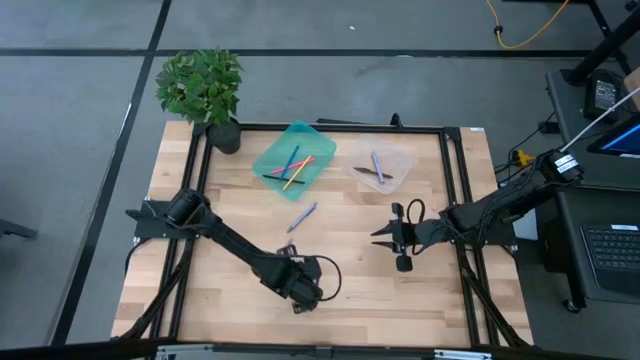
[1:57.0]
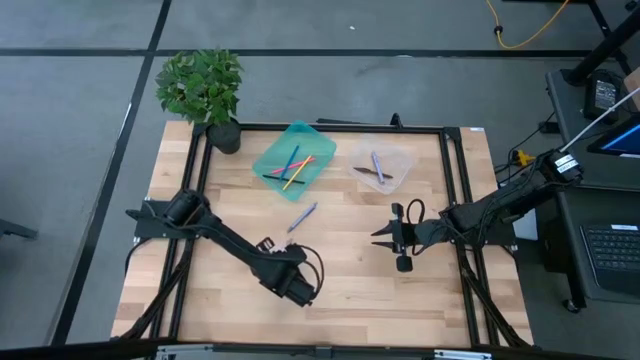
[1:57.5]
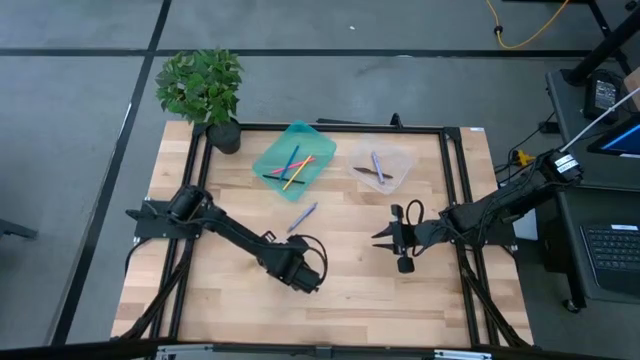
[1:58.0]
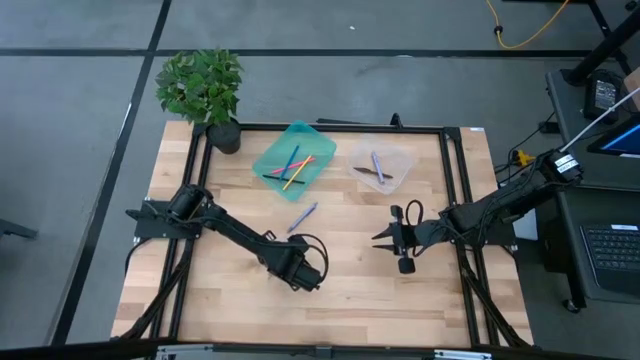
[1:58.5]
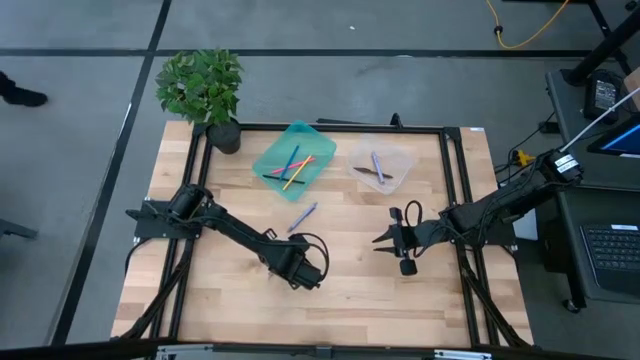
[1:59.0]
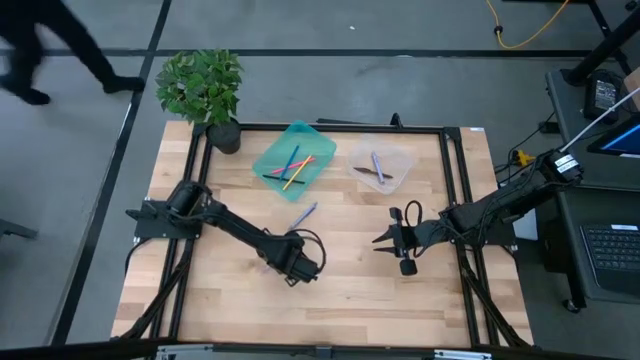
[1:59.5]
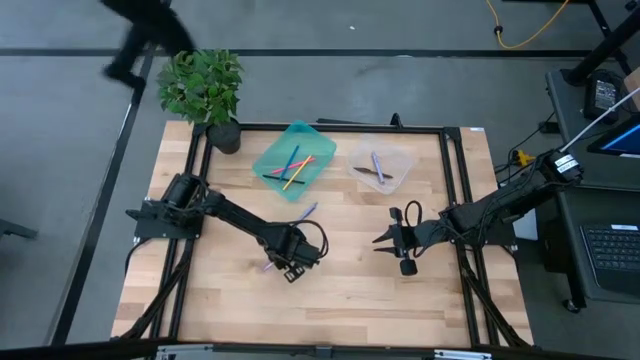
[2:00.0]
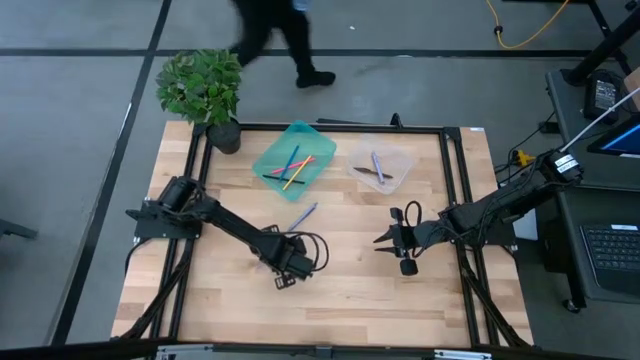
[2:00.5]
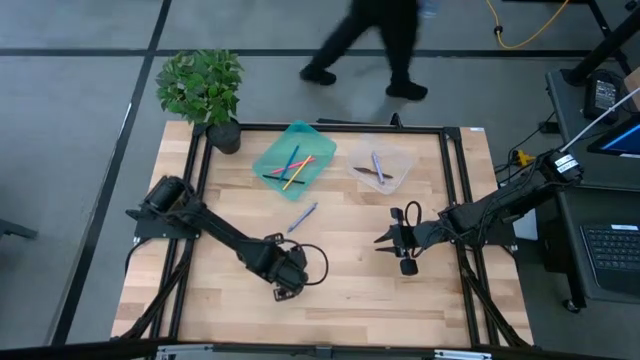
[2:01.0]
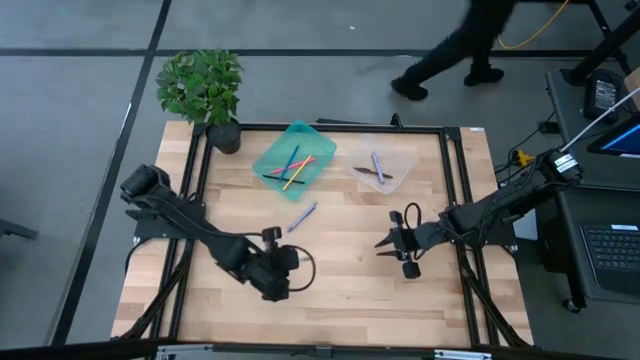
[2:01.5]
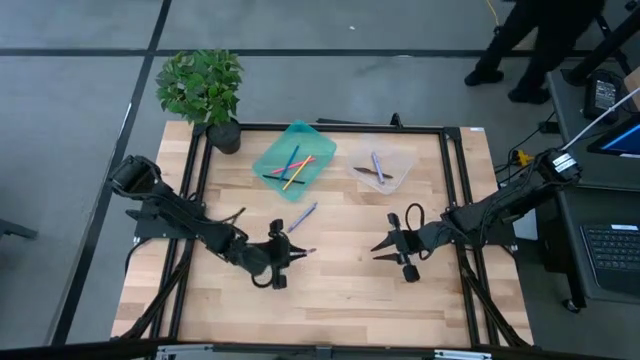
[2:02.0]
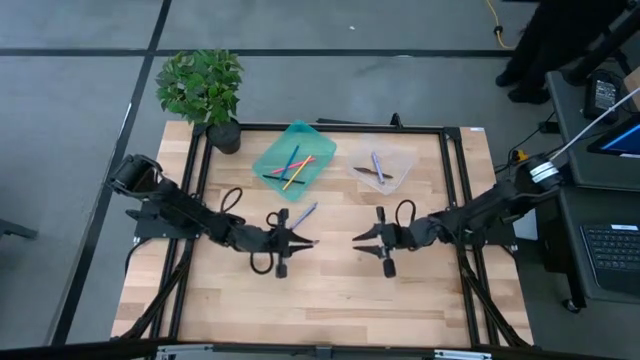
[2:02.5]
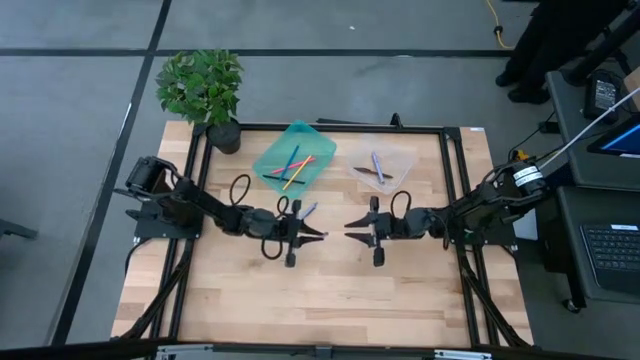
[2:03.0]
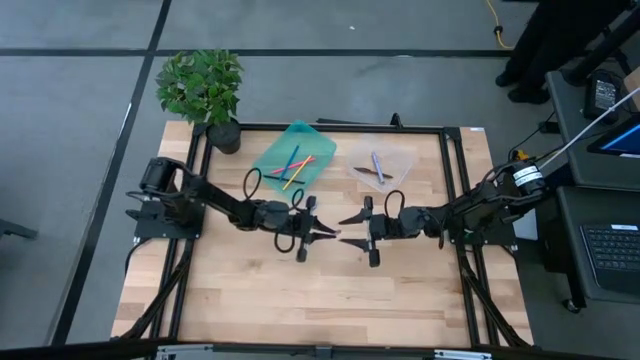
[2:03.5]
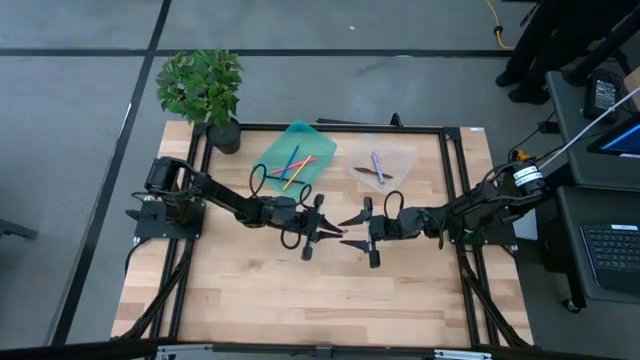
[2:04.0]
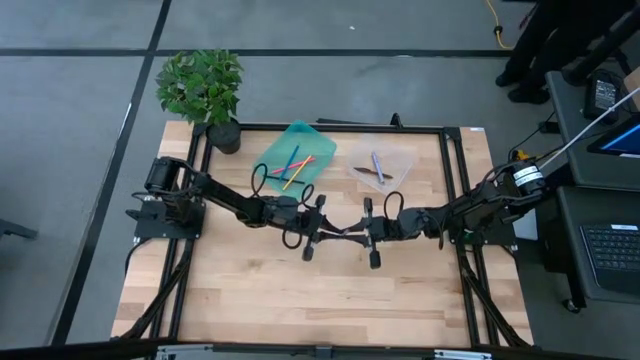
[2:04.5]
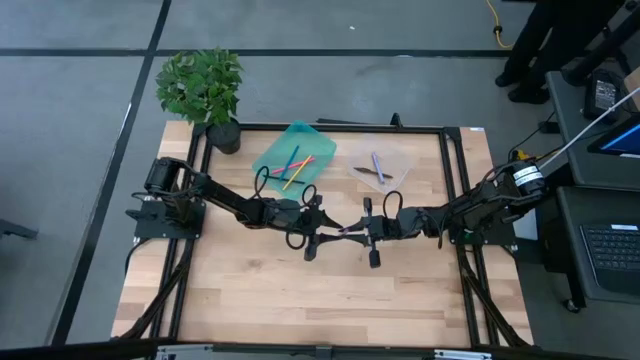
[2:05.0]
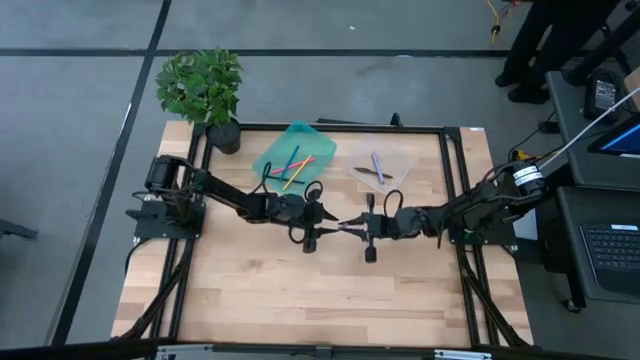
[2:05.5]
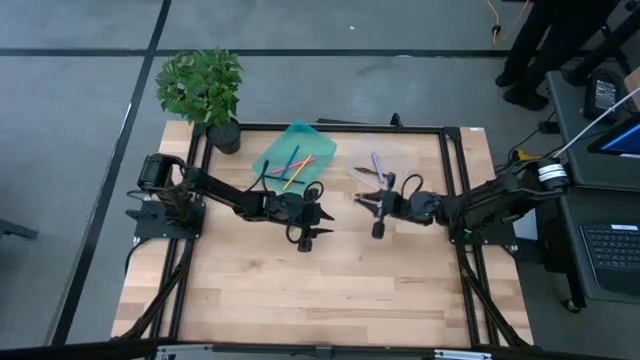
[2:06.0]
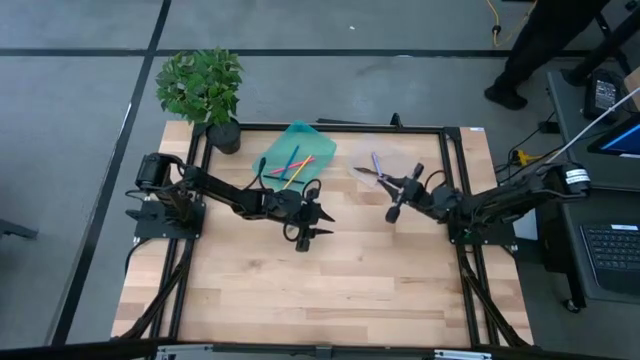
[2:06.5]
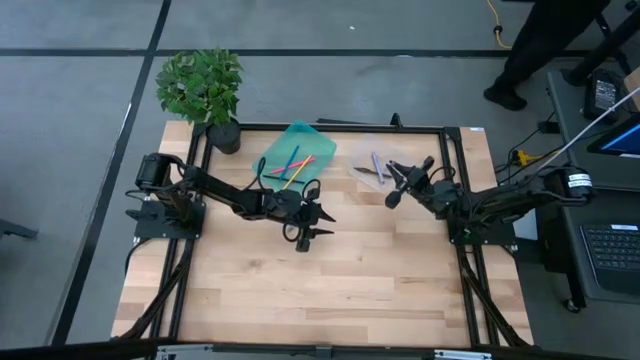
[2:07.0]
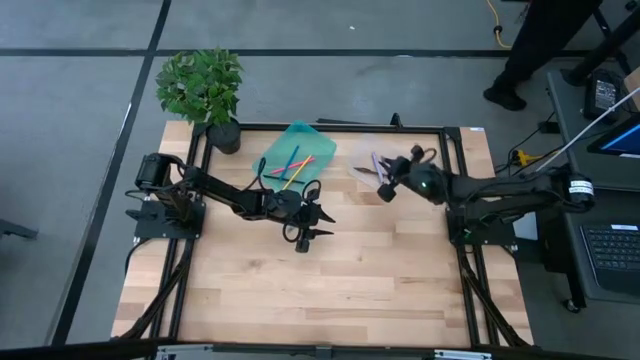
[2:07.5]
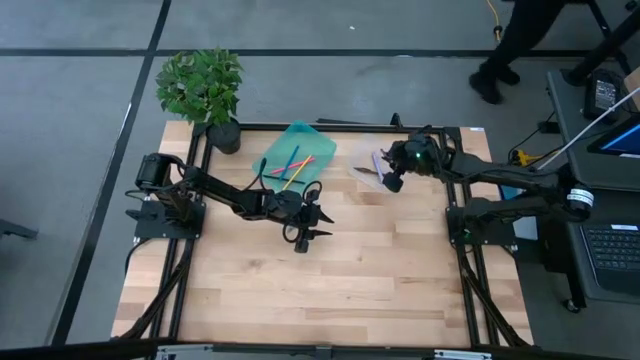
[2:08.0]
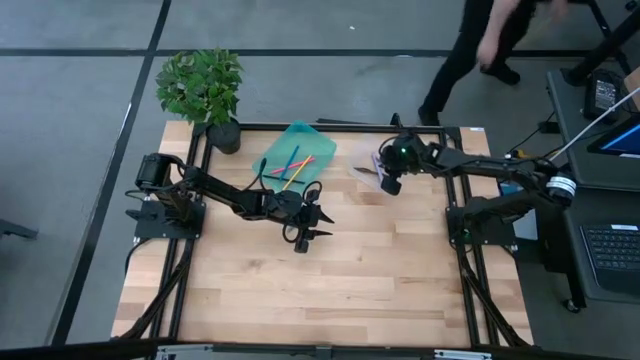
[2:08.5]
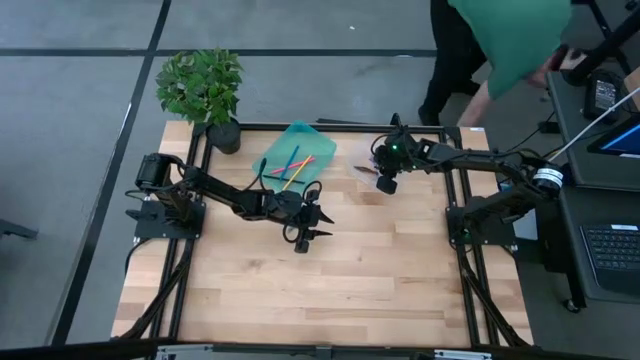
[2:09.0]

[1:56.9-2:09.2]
Task: Sort pens & pencils
Put the purple pen into the transparent bin

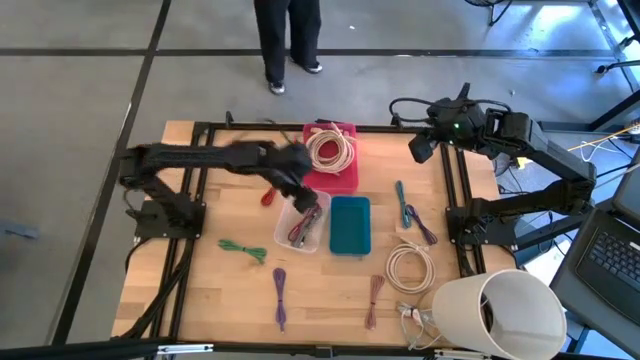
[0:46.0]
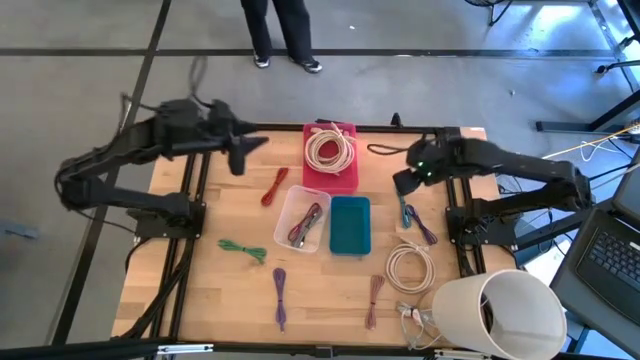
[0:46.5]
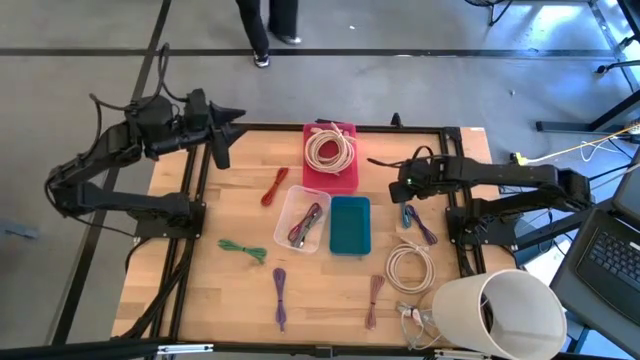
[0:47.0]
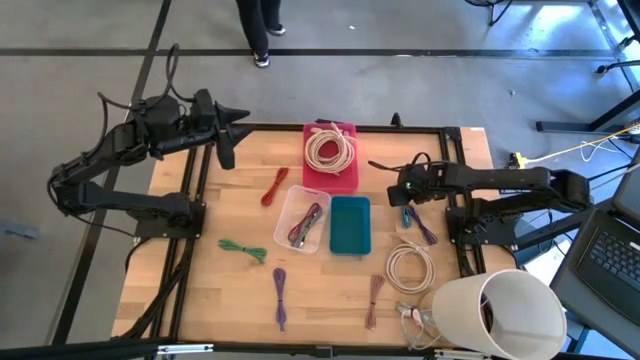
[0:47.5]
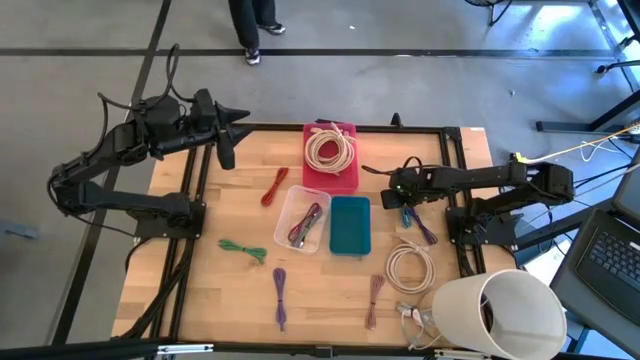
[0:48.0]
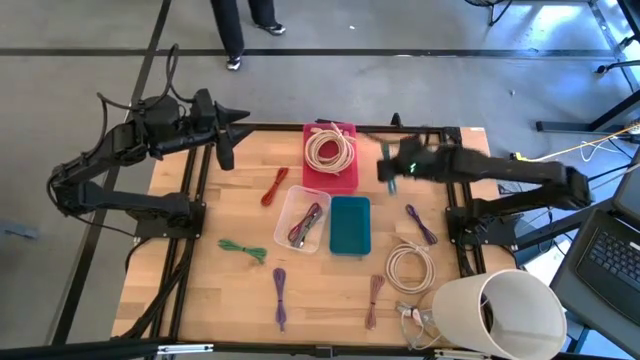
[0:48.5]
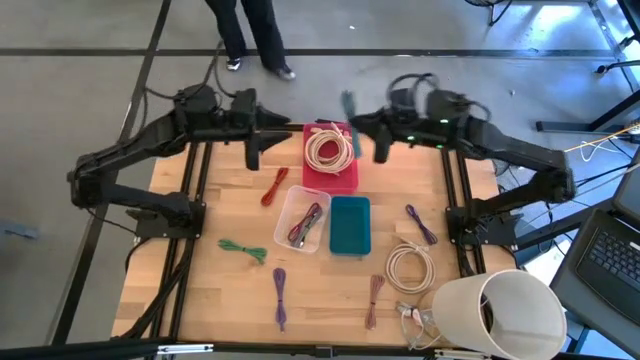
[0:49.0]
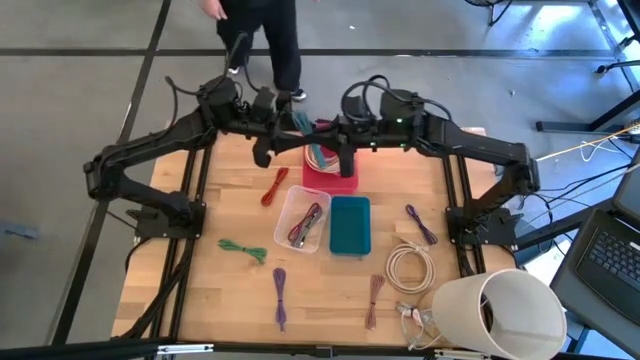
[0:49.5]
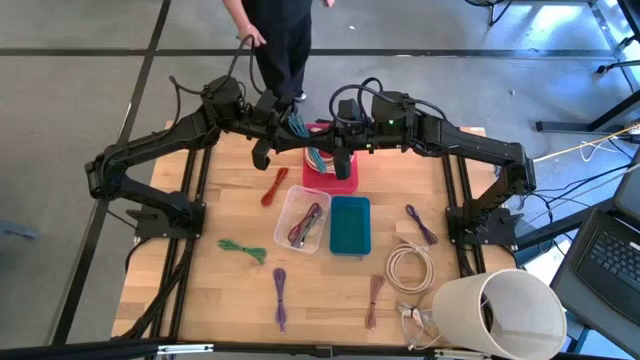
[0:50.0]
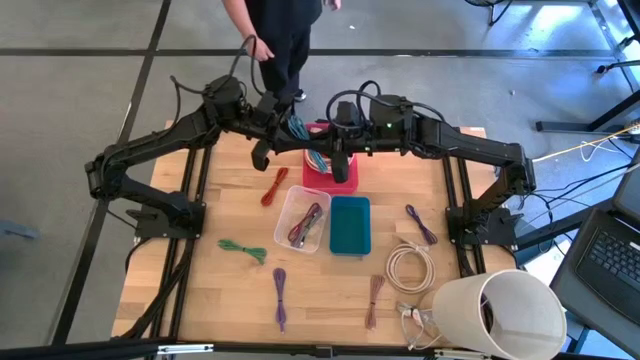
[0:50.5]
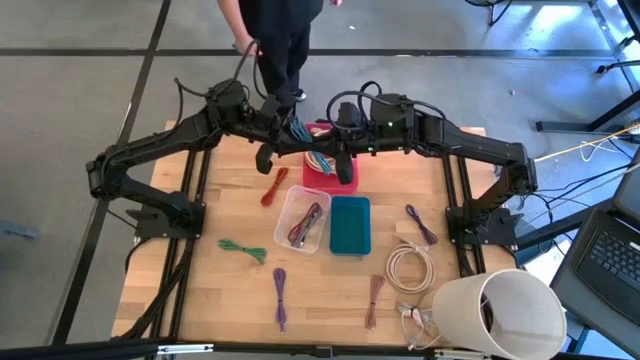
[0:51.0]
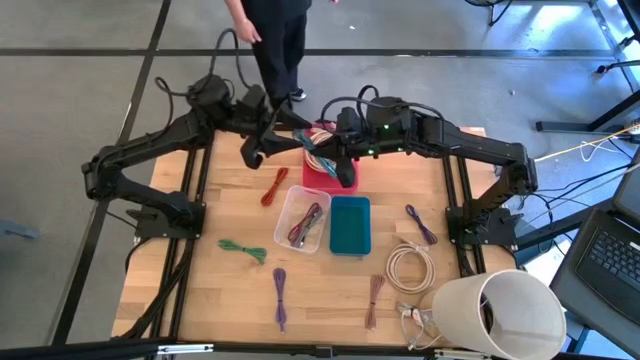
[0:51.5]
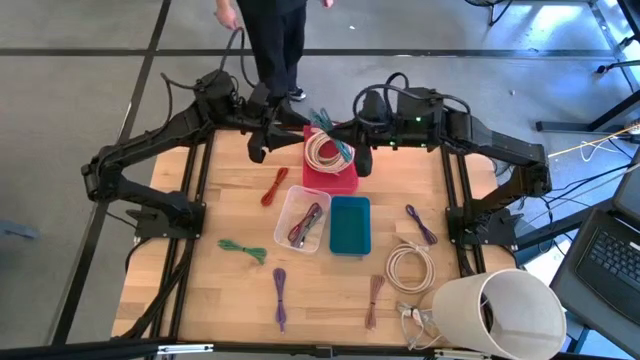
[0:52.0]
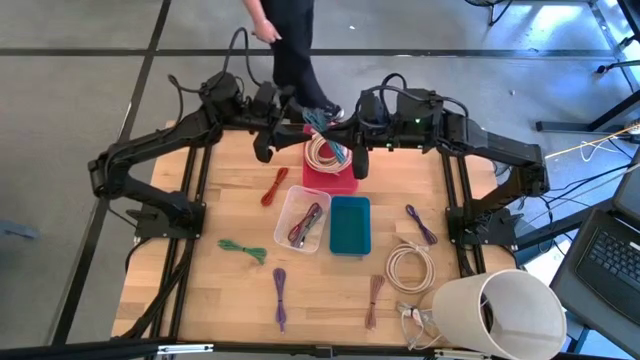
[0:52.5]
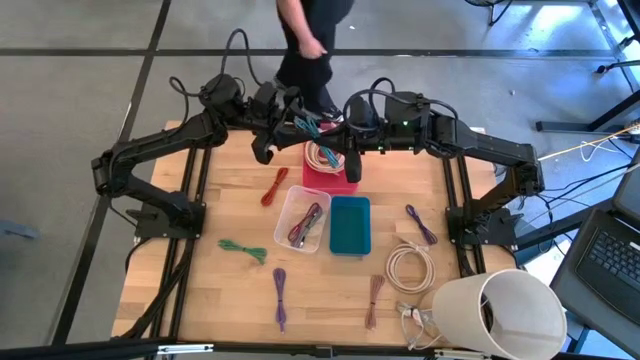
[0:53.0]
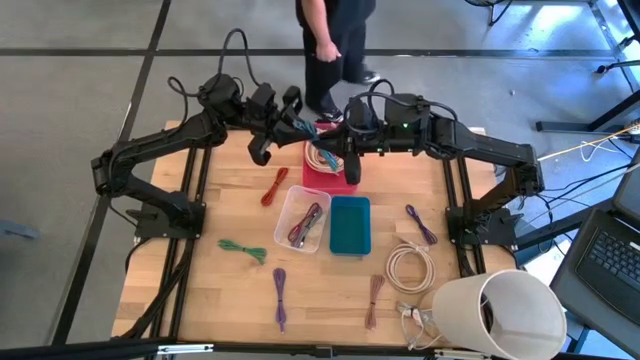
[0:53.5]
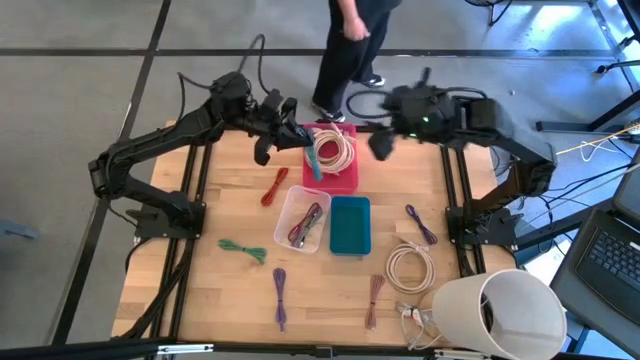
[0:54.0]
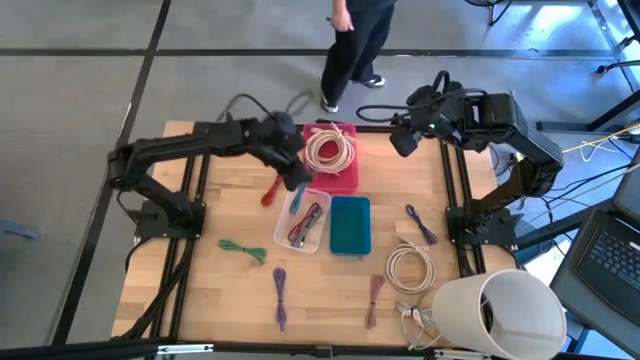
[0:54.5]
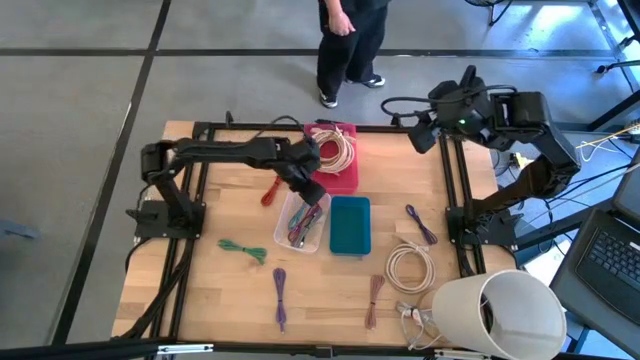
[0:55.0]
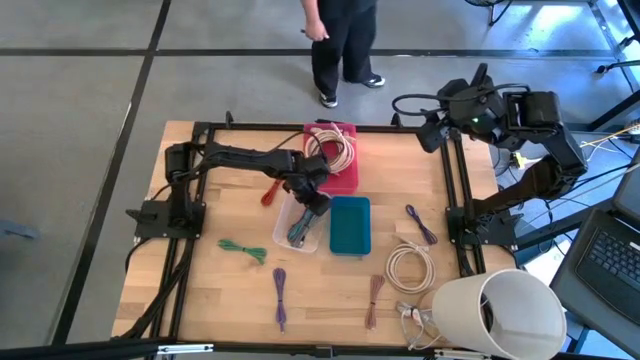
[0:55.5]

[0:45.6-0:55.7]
Task: Pick & Place USB Port
Put the black and blue charger cable into the transparent bin
